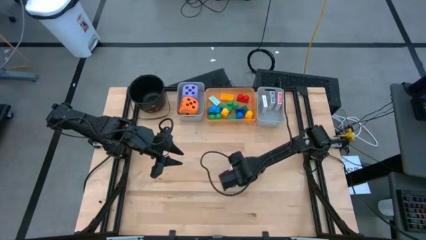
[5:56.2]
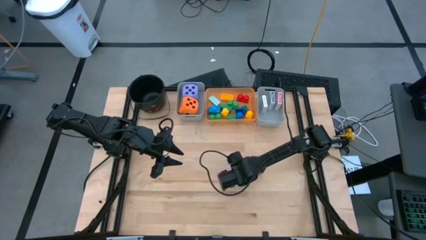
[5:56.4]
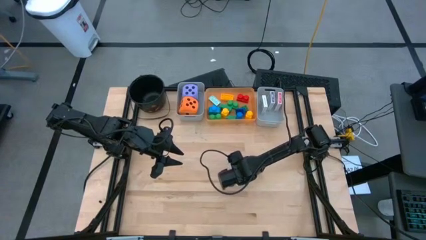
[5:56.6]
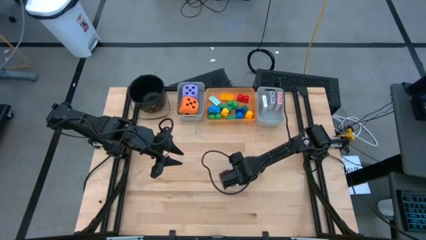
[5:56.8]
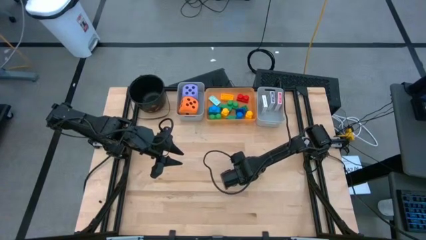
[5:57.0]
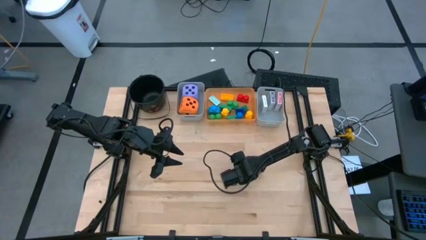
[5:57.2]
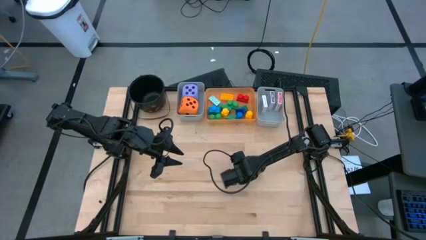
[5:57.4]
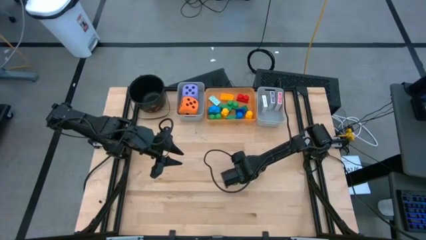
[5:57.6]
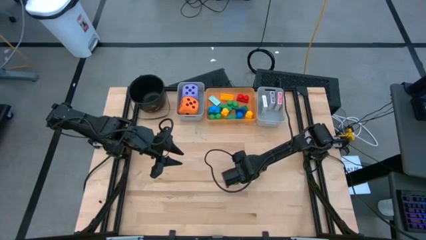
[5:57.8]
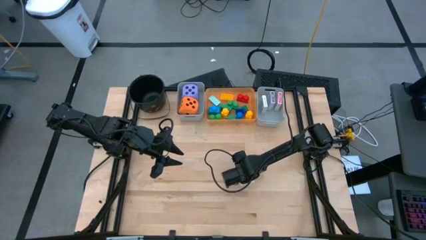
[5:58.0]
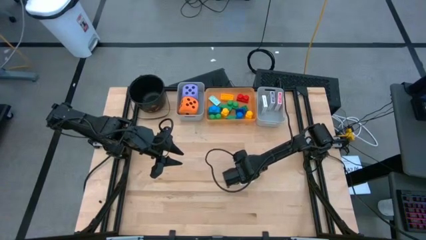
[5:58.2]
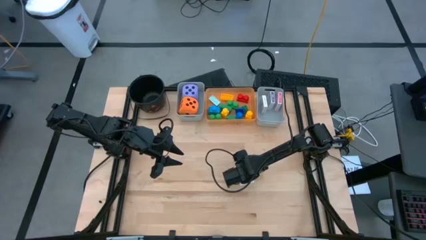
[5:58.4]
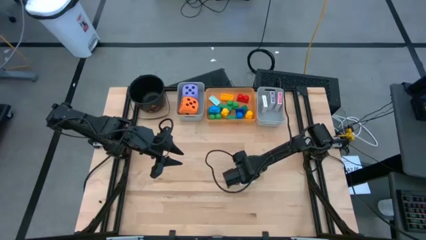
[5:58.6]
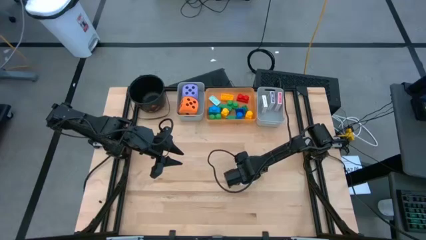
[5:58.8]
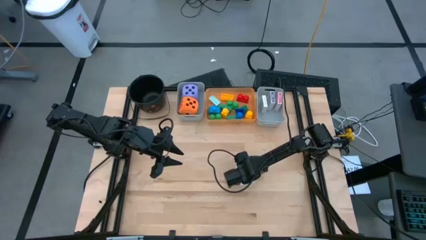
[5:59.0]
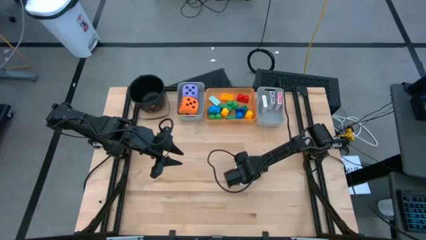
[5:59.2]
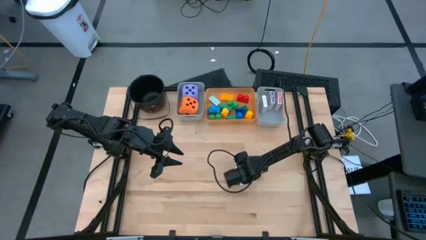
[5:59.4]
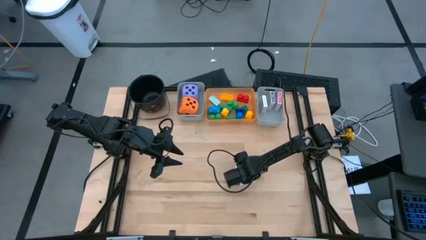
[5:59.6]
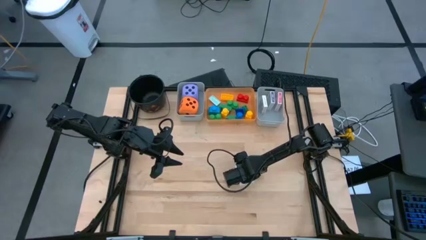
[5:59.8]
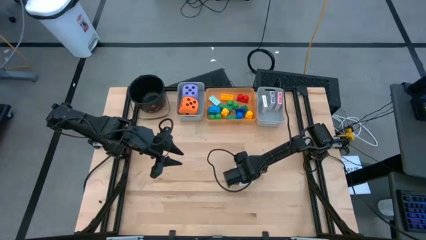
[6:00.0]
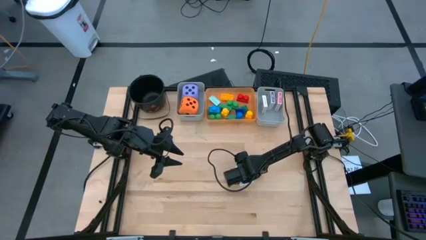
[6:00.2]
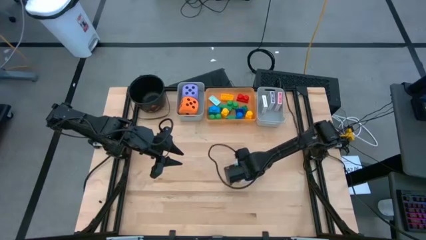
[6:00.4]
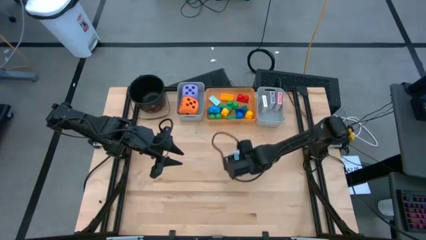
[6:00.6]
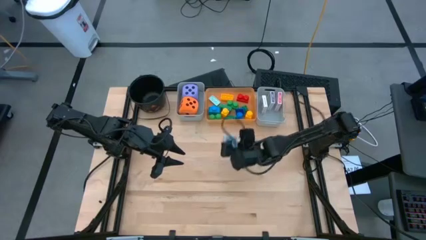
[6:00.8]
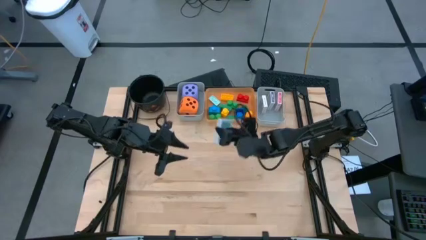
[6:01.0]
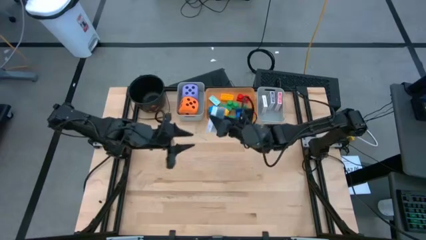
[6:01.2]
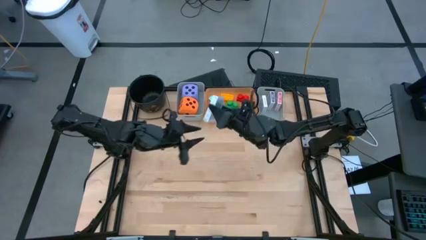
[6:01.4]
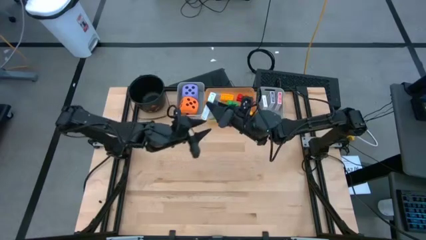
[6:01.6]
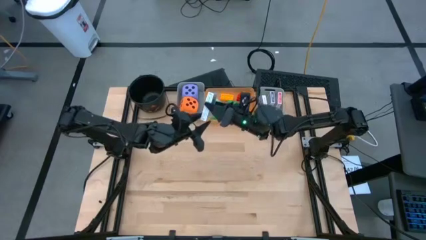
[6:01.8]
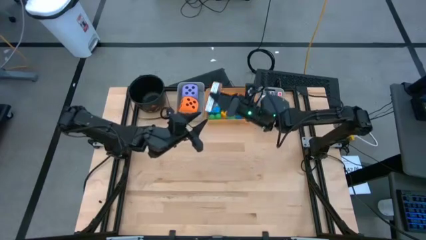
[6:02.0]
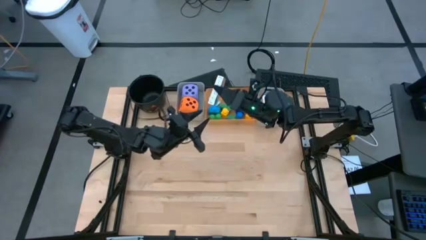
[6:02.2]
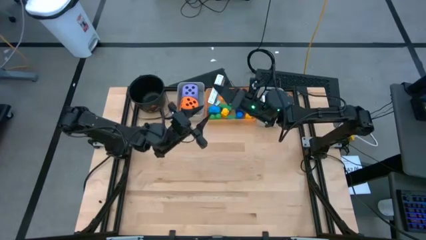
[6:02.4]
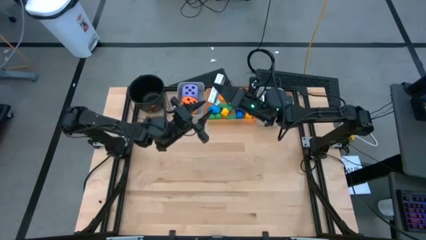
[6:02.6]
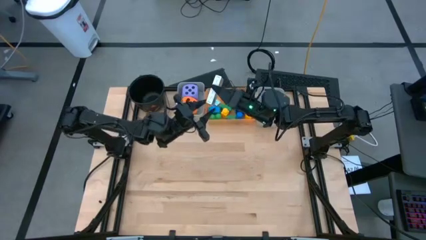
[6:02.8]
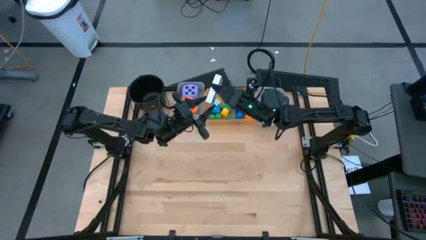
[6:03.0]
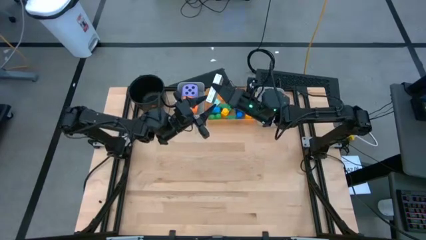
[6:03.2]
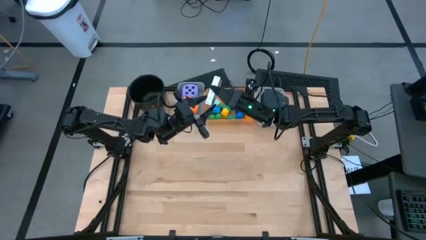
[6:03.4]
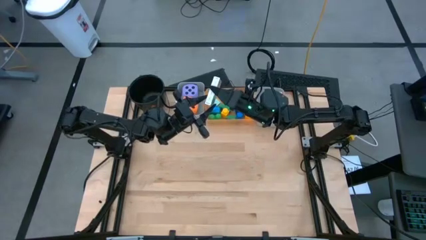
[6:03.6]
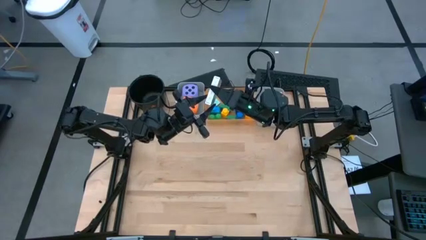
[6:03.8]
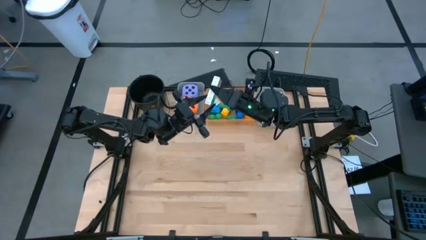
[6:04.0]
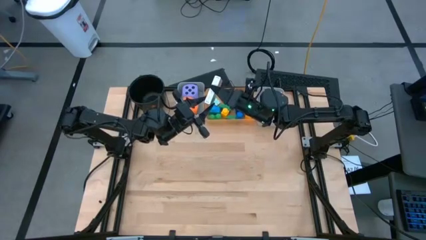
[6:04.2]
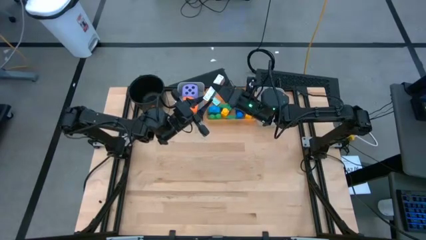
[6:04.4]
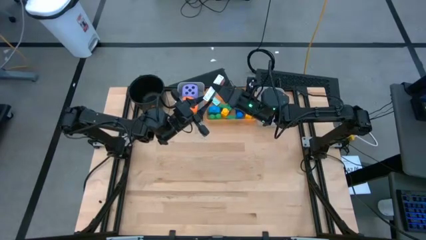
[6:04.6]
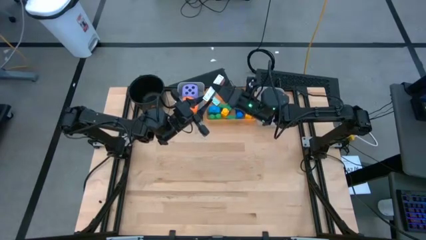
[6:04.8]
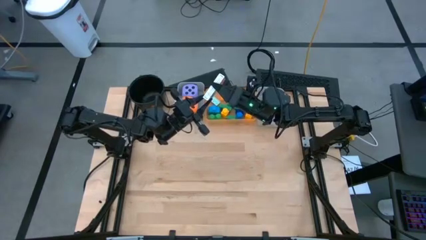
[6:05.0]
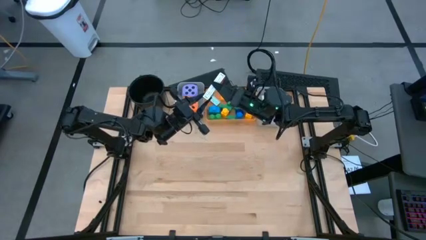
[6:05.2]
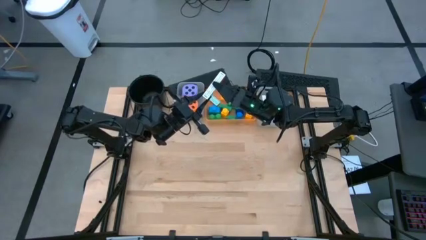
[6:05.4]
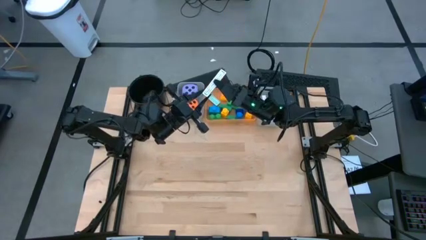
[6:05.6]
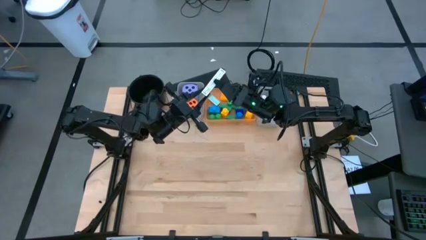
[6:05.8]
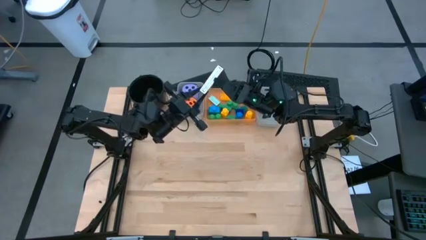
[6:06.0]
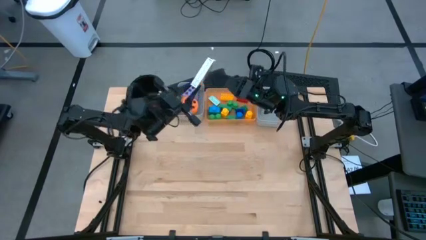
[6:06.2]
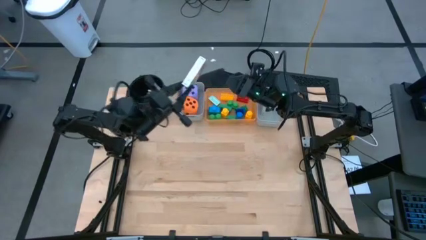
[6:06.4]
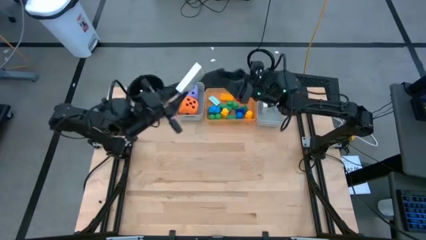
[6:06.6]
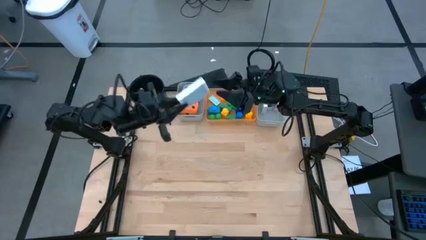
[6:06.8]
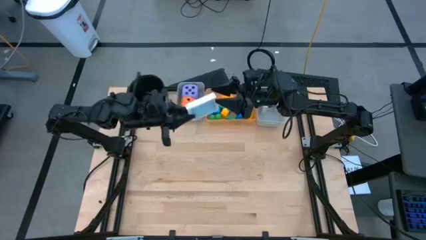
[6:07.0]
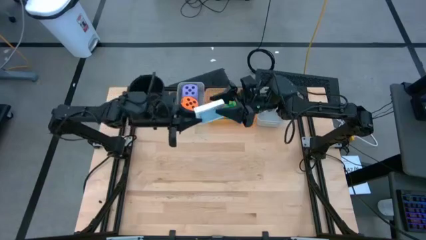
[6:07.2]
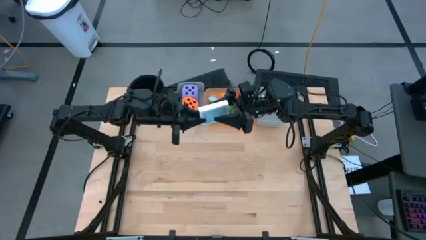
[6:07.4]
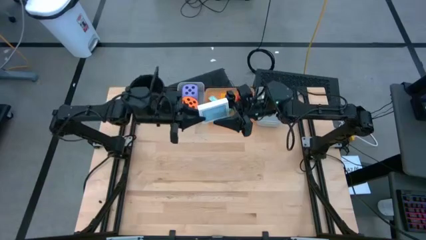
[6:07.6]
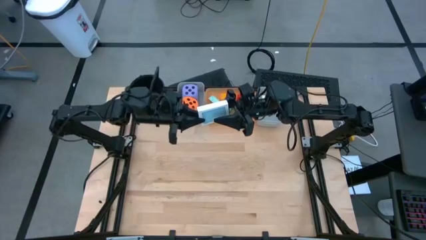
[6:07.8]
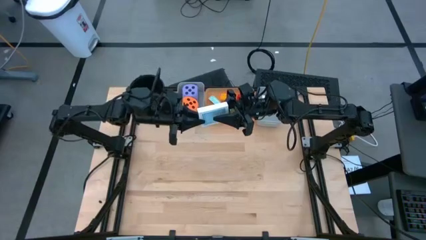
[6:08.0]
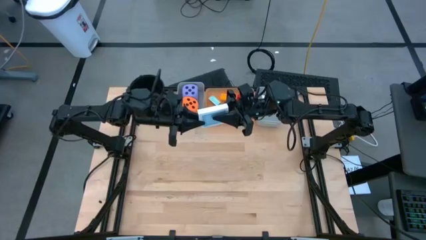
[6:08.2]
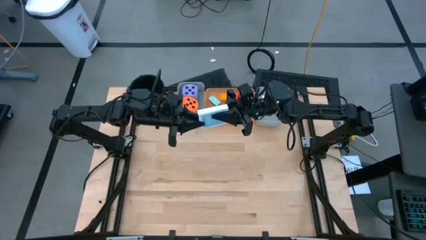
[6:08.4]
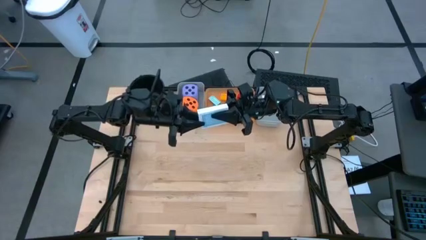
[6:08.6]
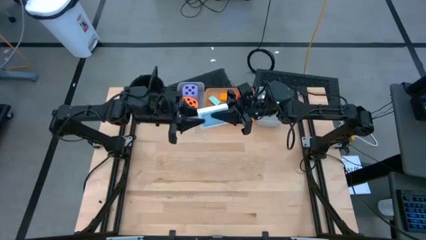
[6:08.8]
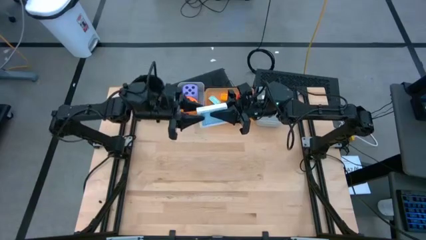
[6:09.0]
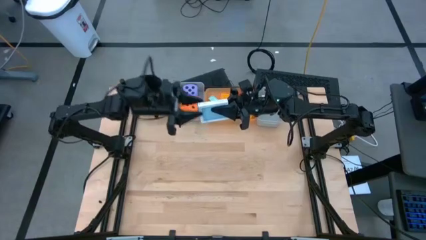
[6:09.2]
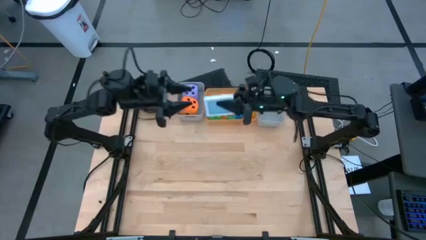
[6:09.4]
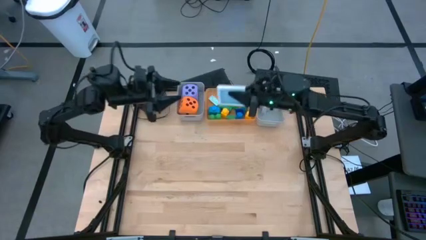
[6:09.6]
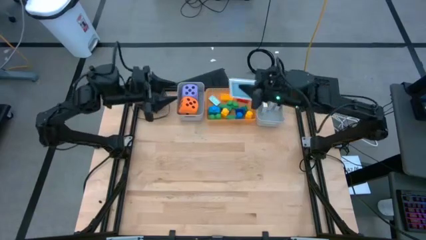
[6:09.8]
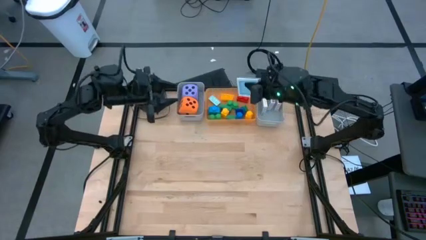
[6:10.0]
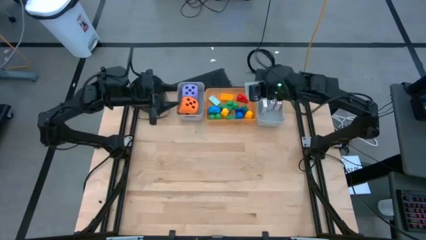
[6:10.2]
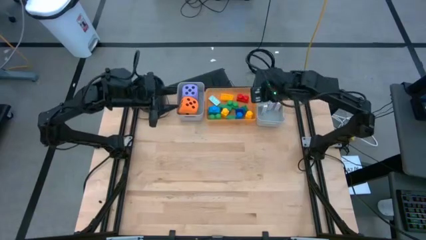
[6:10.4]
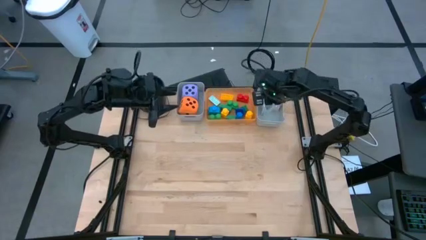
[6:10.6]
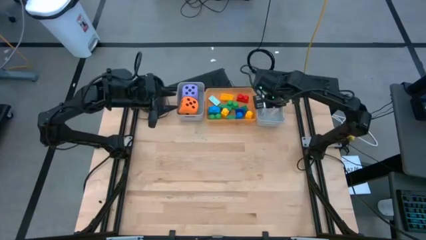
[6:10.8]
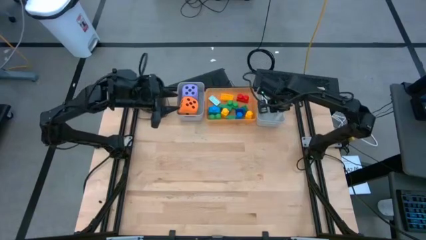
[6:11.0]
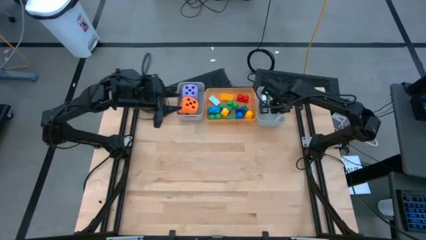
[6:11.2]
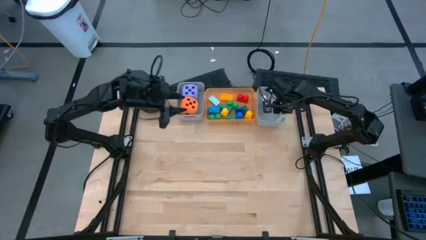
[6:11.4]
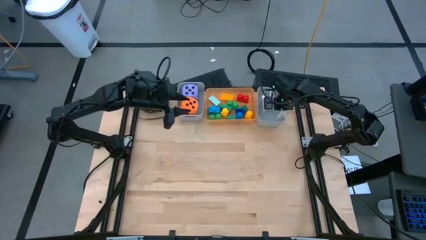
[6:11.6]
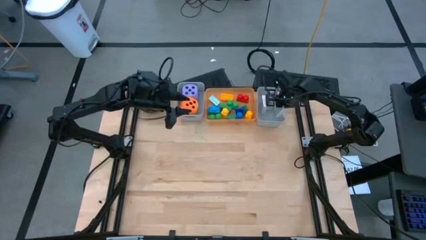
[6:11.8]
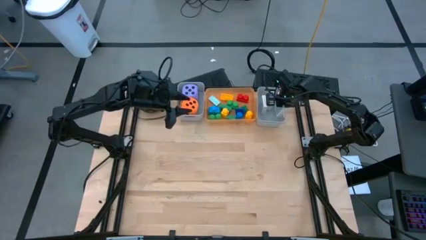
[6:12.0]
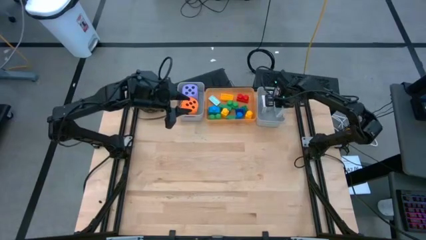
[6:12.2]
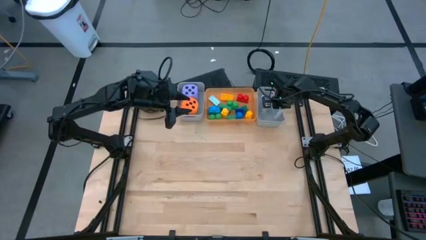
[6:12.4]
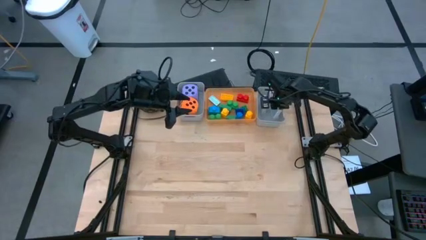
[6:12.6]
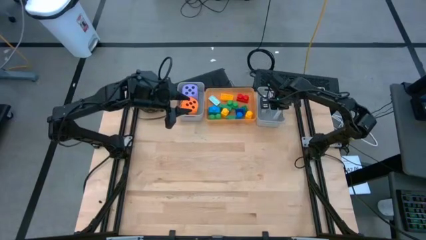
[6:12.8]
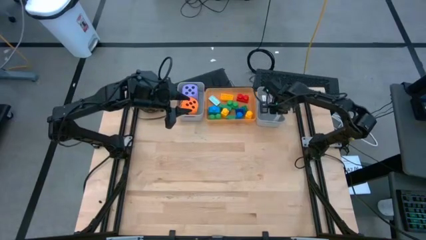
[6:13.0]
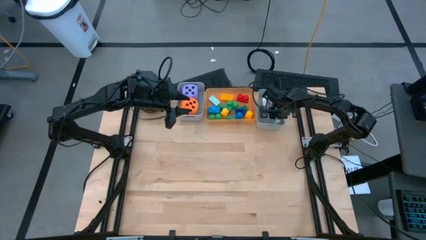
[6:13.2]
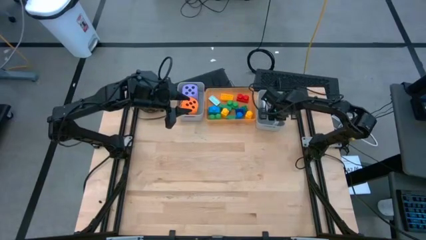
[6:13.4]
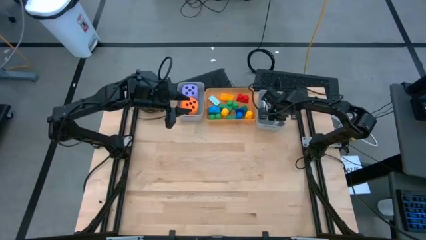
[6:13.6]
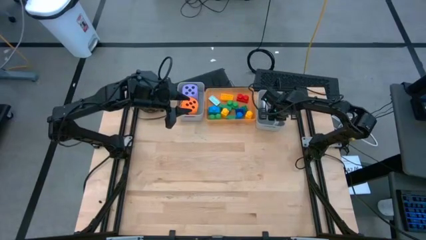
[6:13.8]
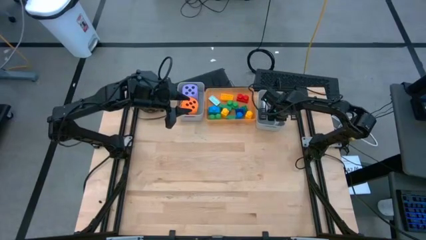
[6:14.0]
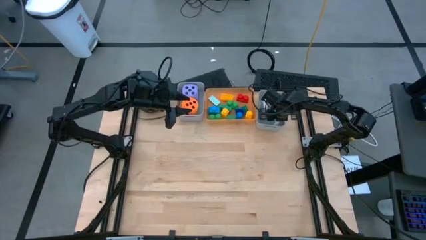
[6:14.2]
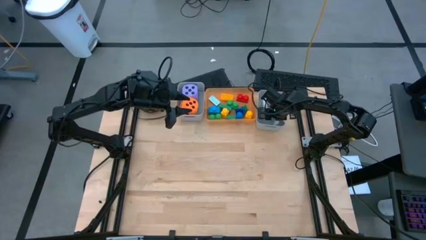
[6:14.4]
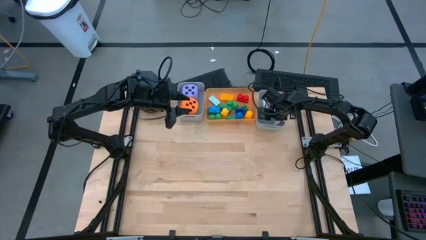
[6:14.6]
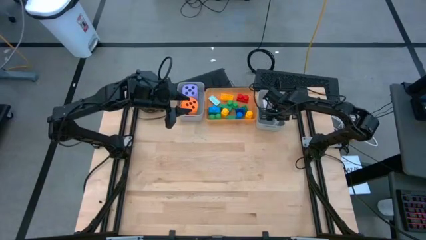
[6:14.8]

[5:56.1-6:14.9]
Task: Pick & Place Toys
Put the blue deck of cards into the right gray bin
